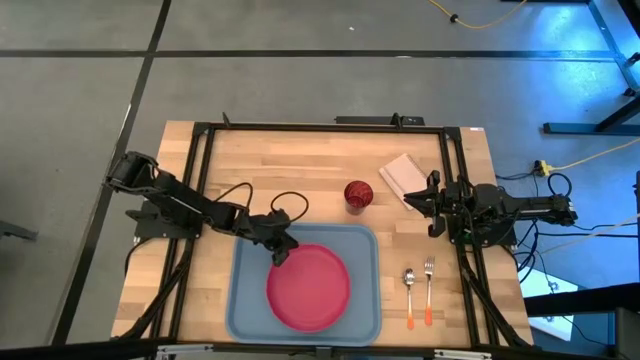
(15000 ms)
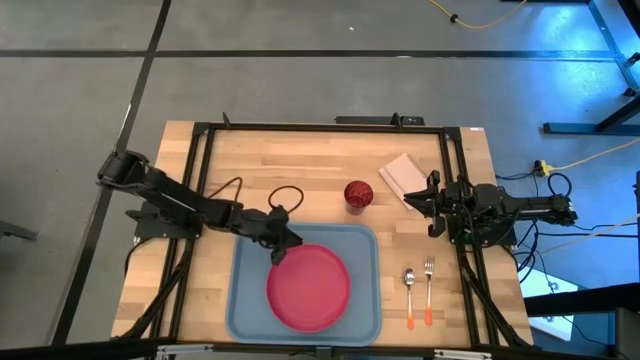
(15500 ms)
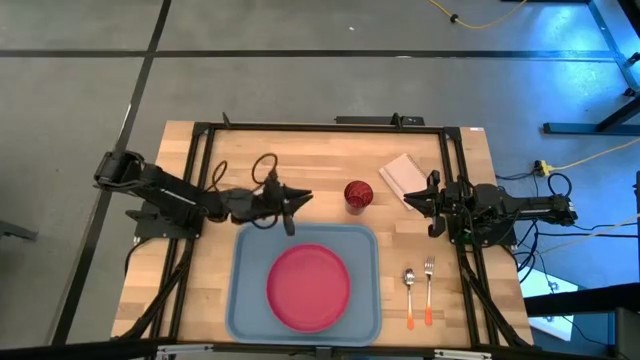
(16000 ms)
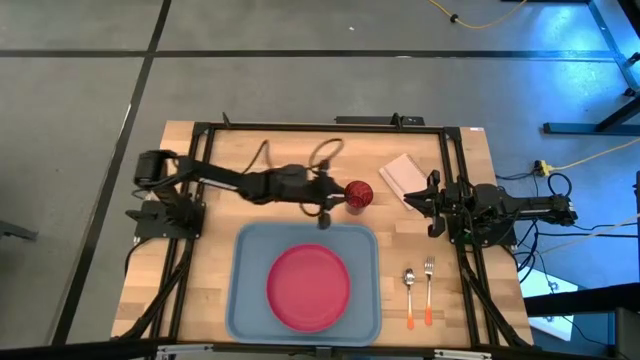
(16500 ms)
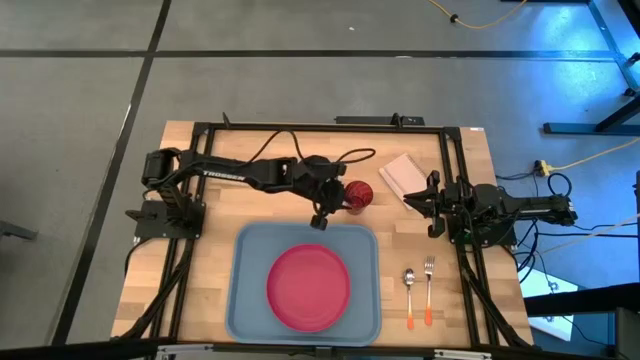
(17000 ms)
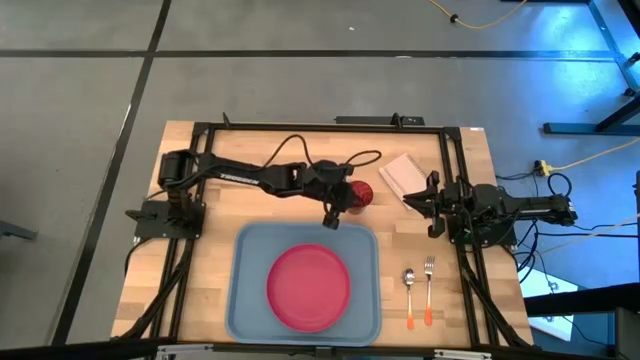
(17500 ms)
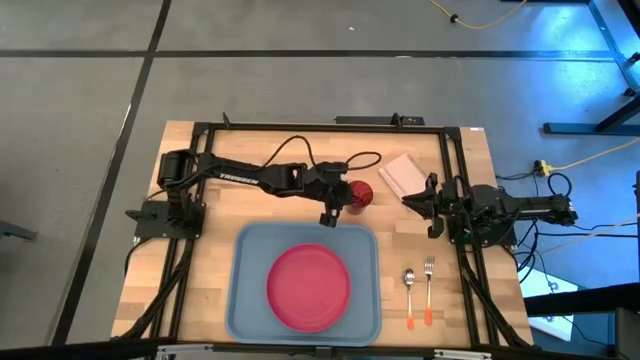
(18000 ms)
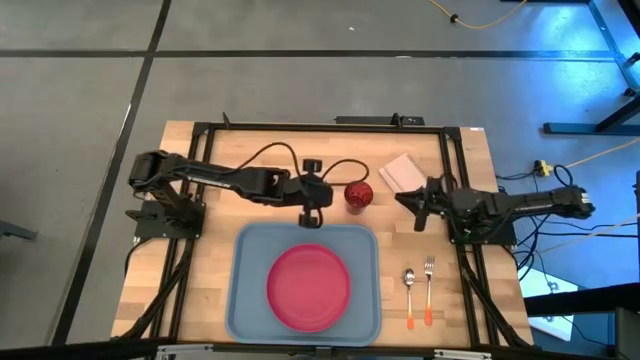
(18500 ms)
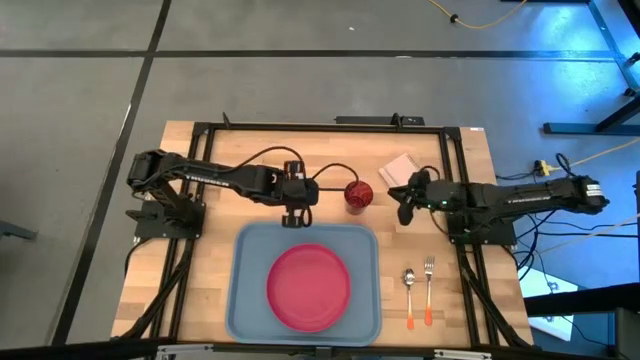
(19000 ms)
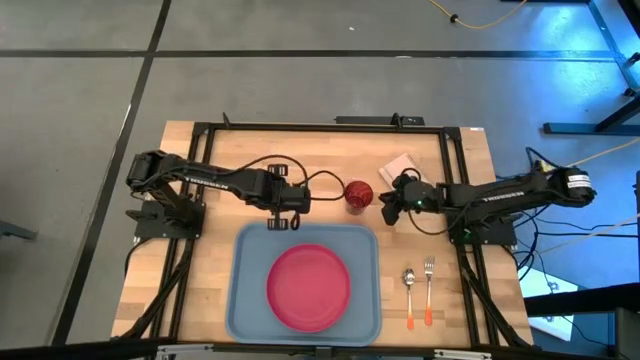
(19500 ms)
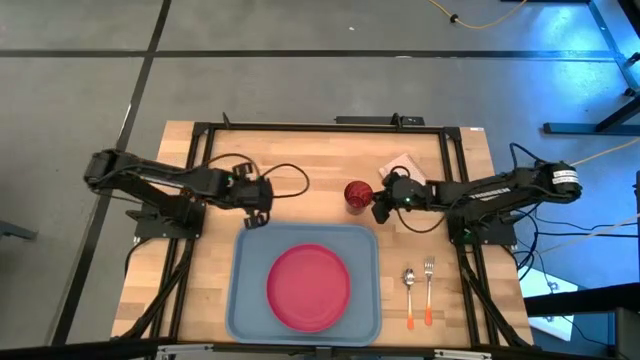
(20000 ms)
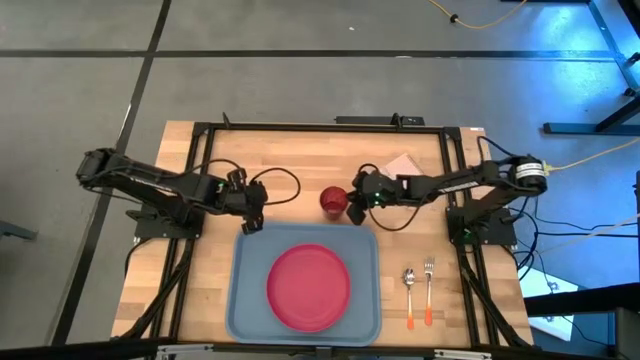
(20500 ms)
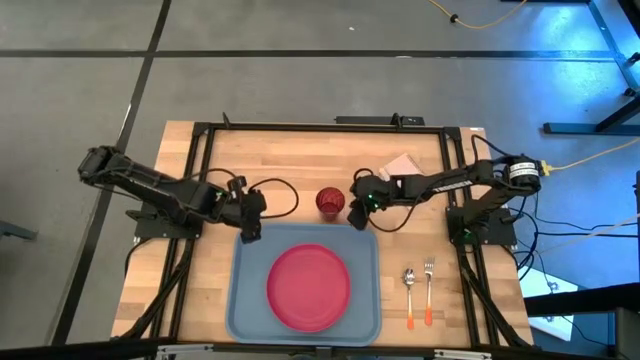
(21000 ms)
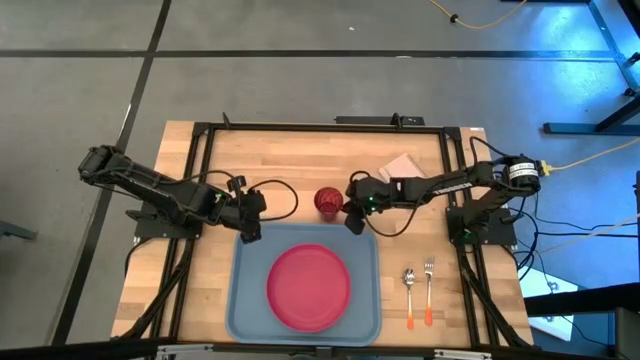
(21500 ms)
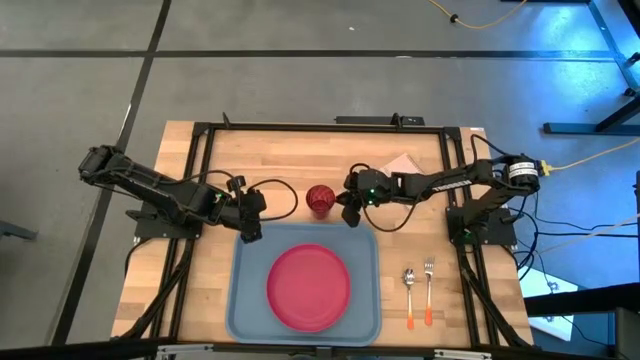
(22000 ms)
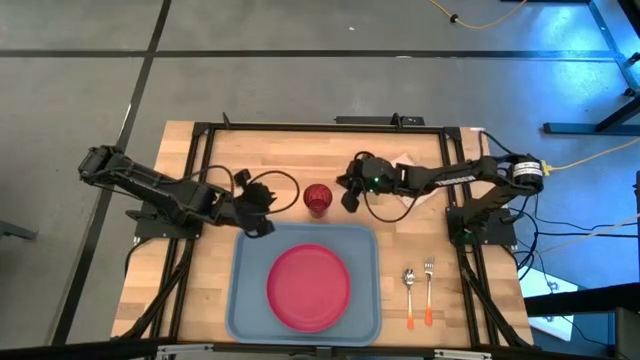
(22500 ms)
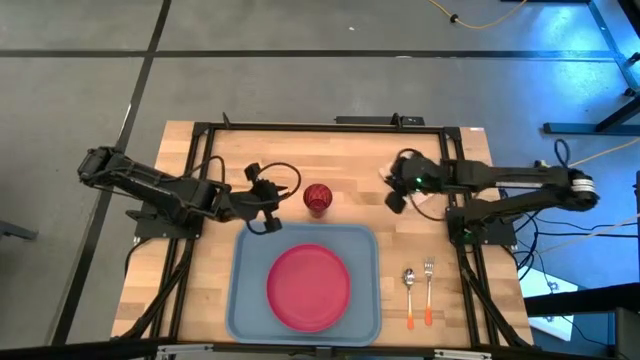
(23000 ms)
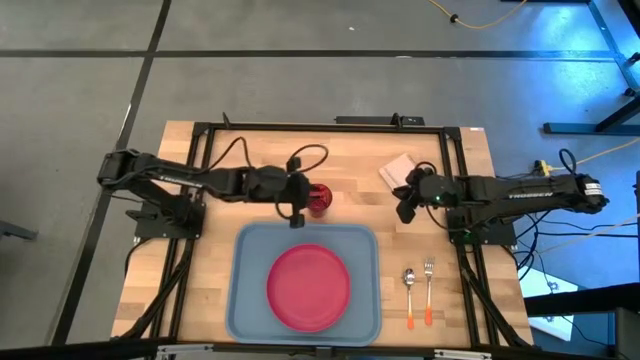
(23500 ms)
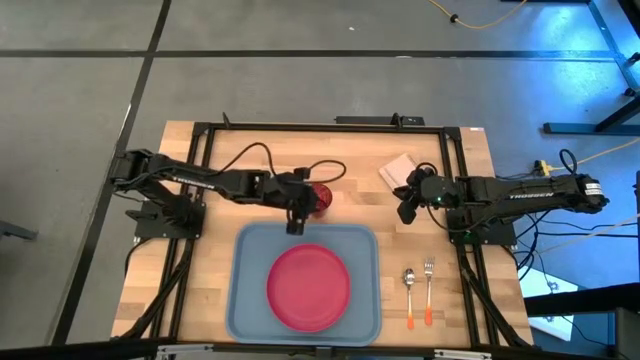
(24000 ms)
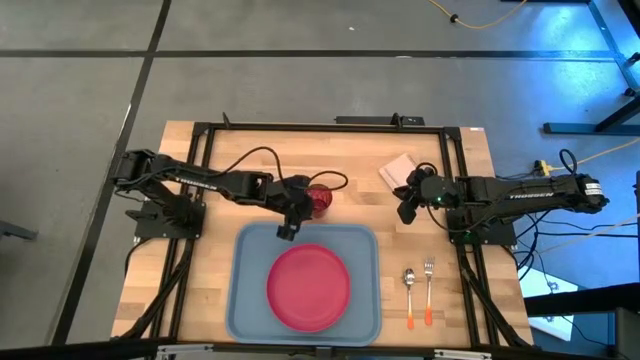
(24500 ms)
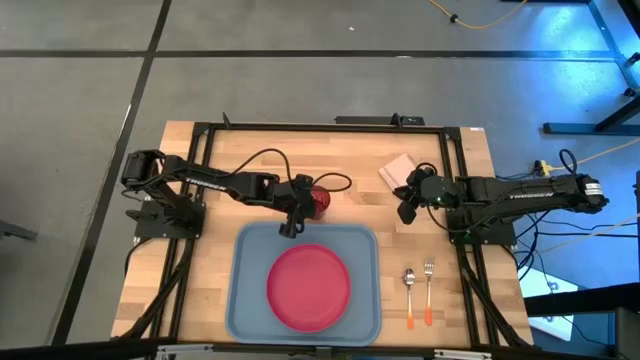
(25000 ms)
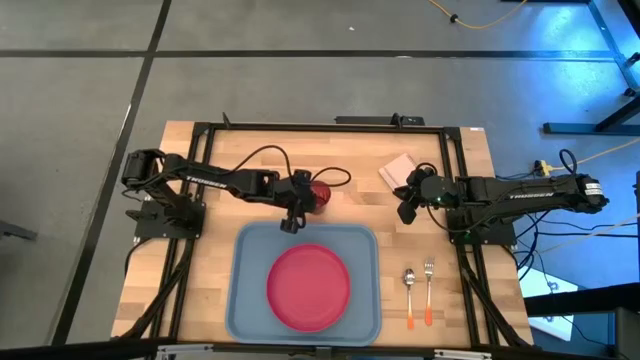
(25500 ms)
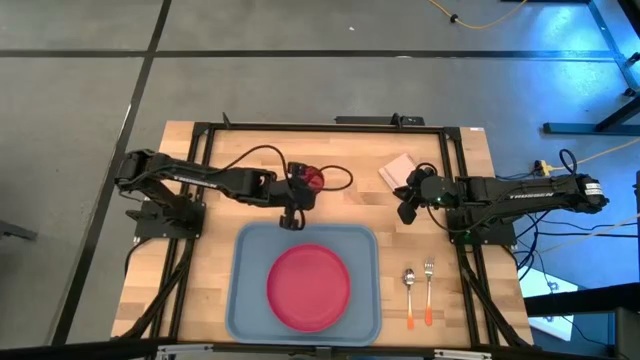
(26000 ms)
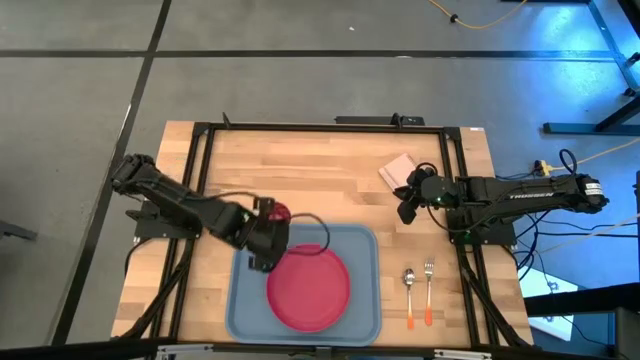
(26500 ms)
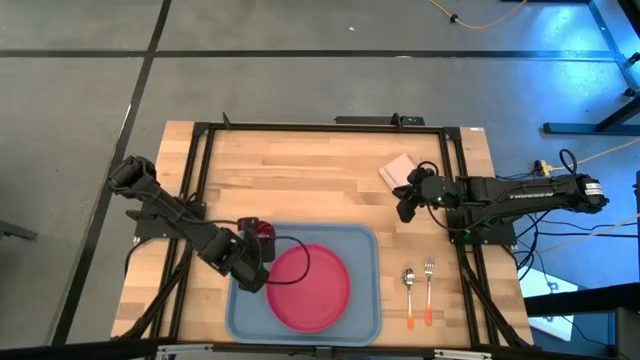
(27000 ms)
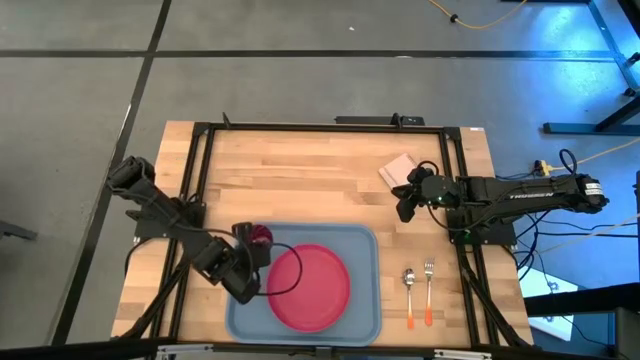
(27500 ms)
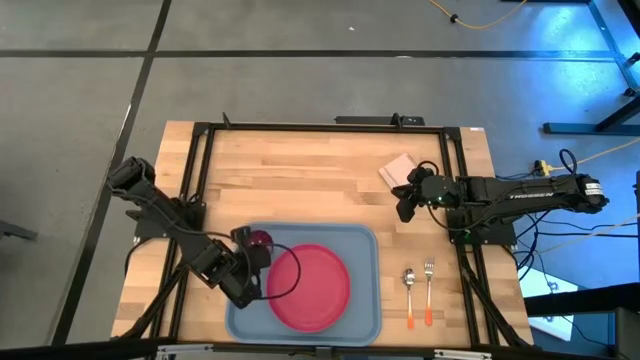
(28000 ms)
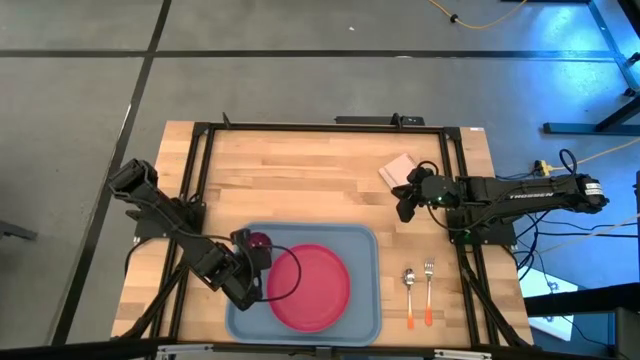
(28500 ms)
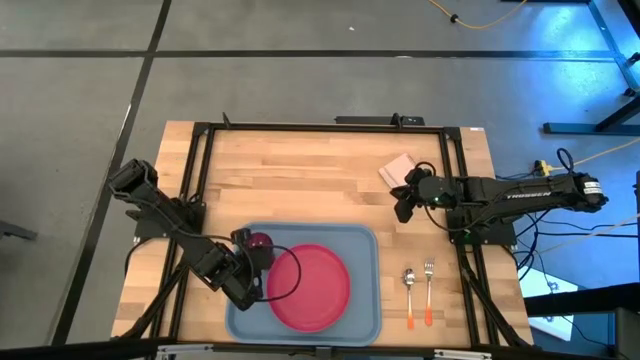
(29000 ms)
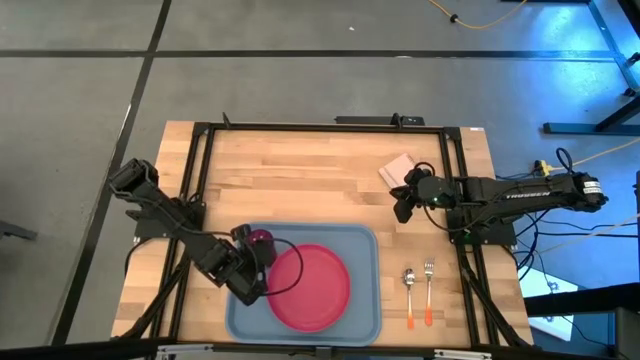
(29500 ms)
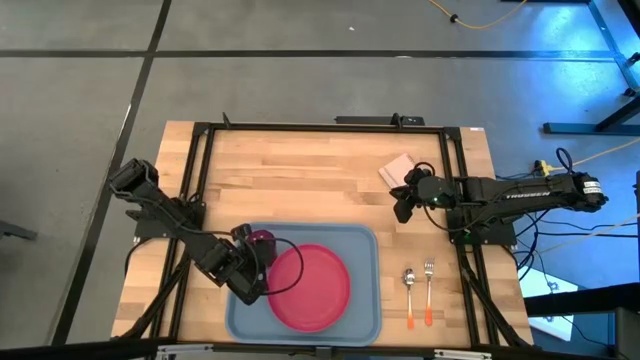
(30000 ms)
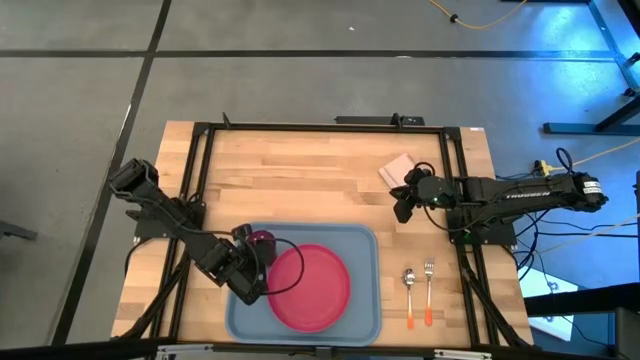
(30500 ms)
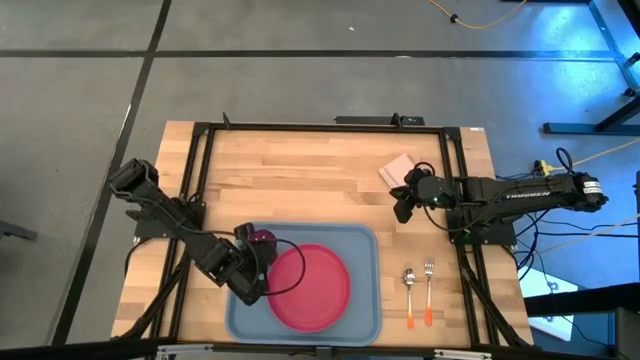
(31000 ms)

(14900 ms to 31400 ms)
Task: Pick and place plate/cup/fork/spoon on tray
Put the red cup on the top left side of the pink plate on the blue tray
